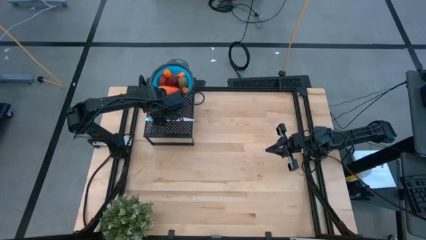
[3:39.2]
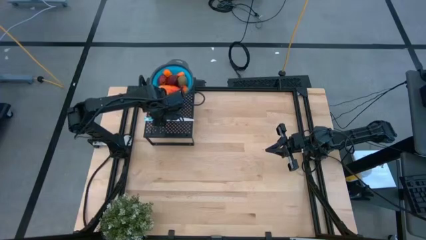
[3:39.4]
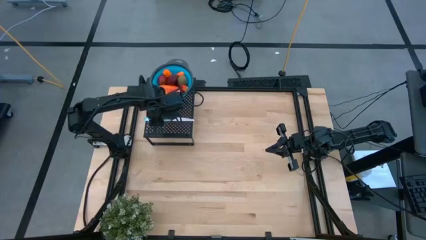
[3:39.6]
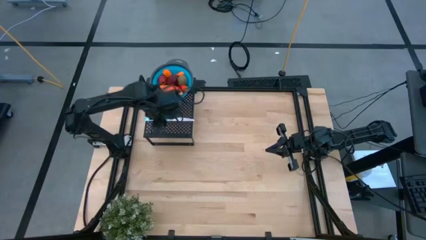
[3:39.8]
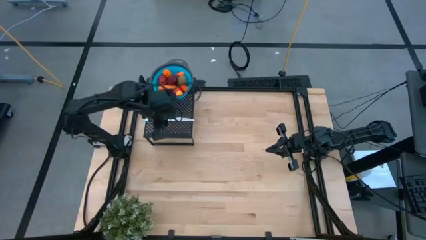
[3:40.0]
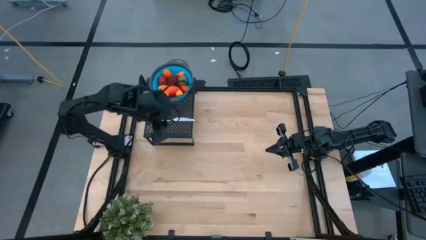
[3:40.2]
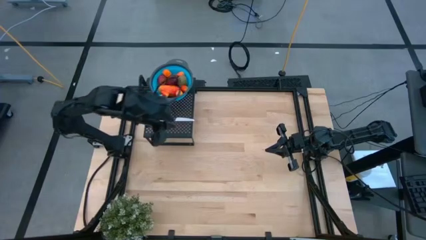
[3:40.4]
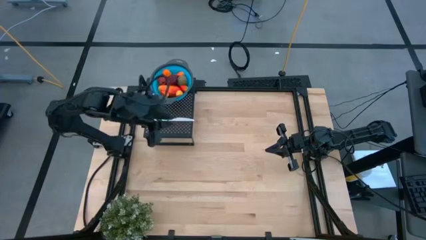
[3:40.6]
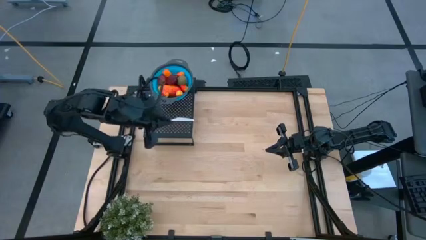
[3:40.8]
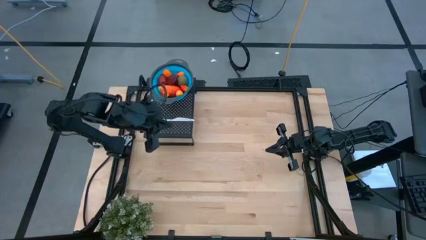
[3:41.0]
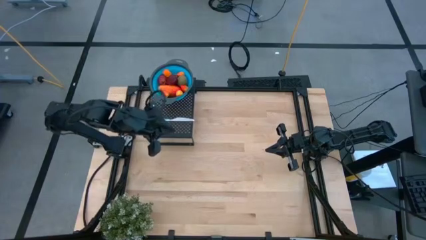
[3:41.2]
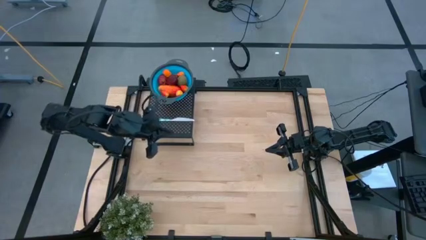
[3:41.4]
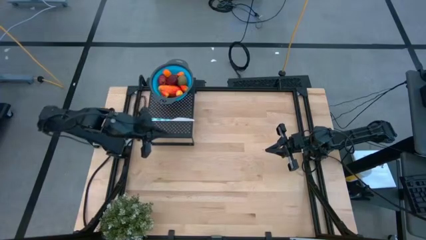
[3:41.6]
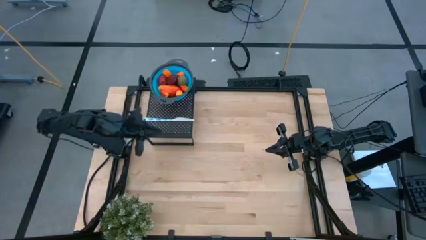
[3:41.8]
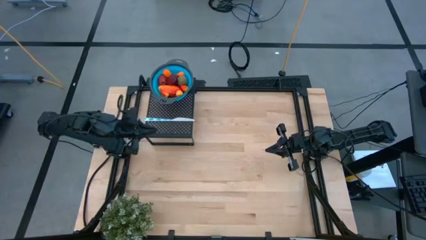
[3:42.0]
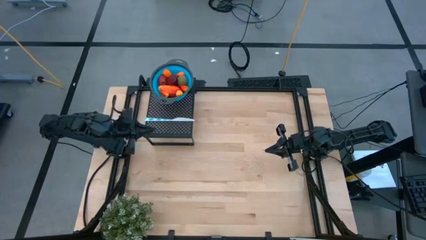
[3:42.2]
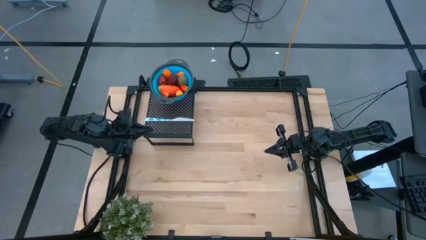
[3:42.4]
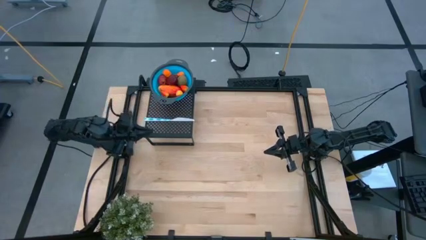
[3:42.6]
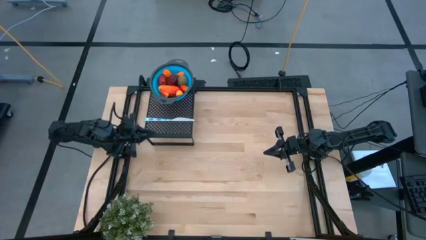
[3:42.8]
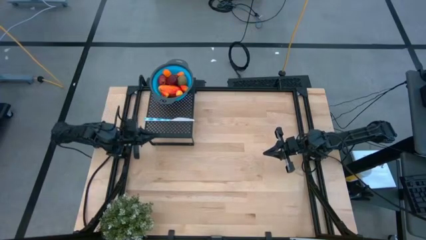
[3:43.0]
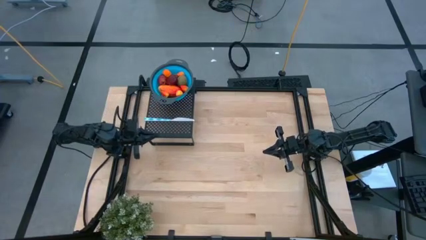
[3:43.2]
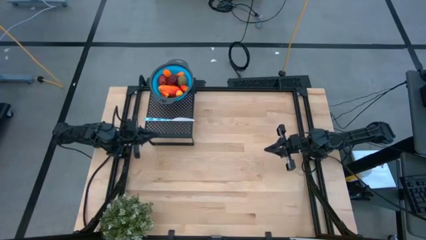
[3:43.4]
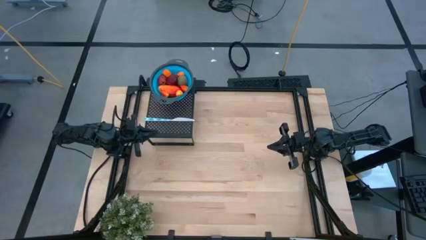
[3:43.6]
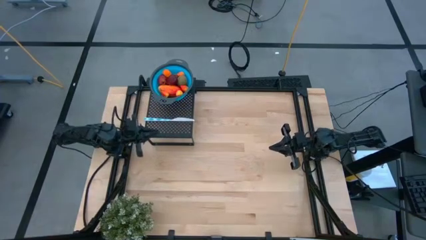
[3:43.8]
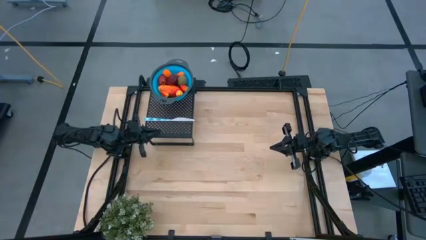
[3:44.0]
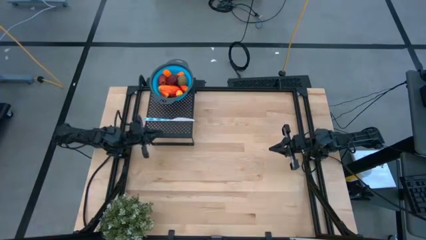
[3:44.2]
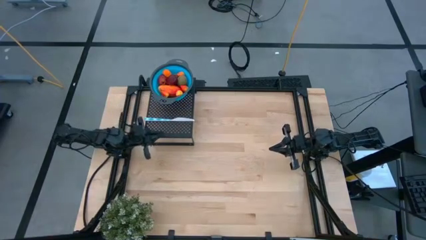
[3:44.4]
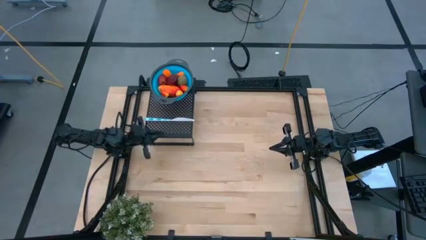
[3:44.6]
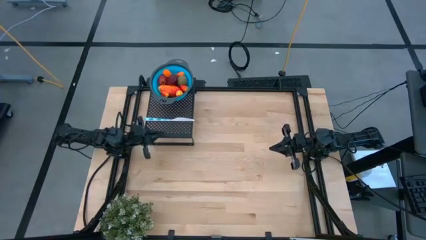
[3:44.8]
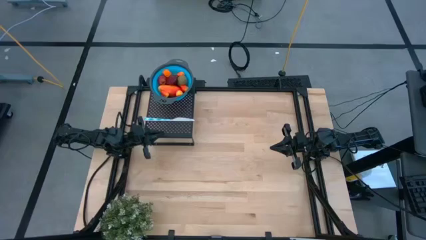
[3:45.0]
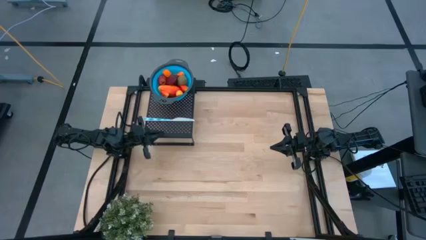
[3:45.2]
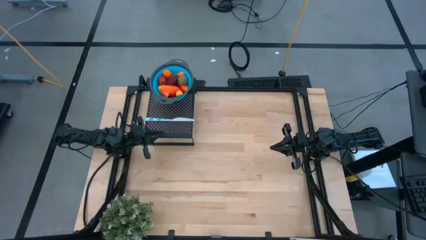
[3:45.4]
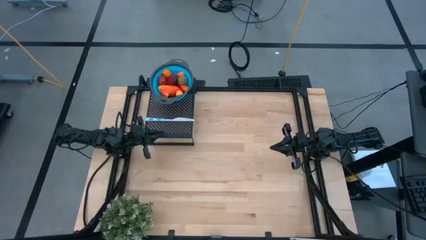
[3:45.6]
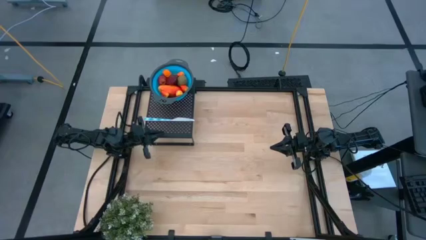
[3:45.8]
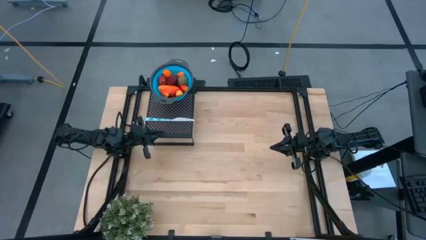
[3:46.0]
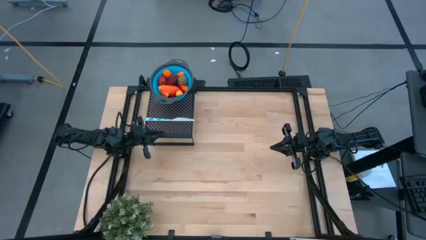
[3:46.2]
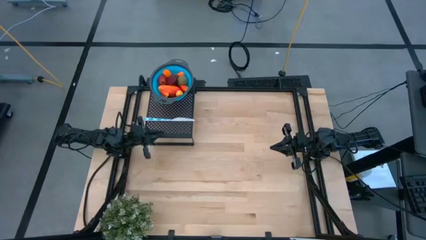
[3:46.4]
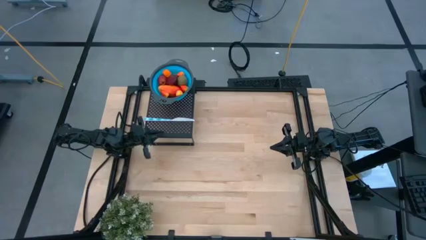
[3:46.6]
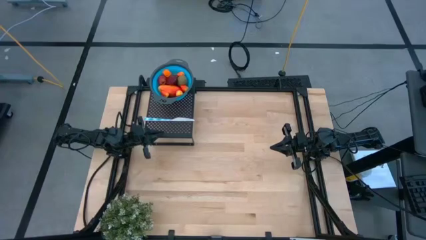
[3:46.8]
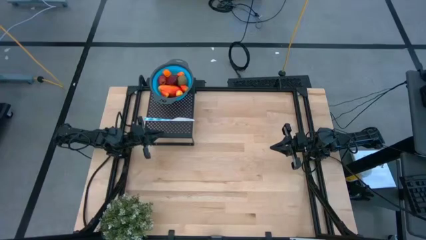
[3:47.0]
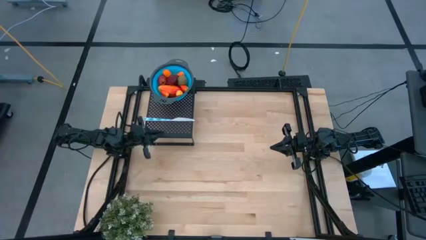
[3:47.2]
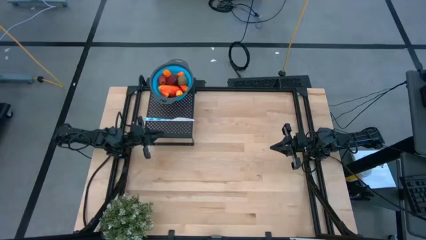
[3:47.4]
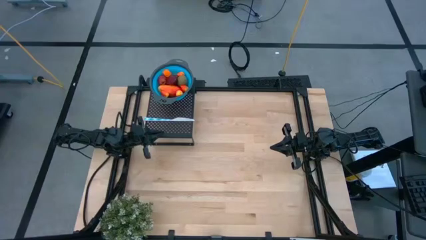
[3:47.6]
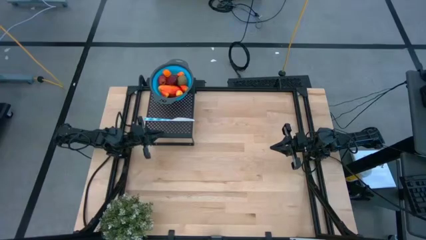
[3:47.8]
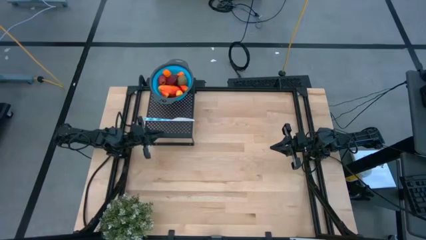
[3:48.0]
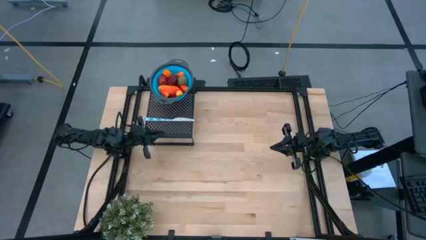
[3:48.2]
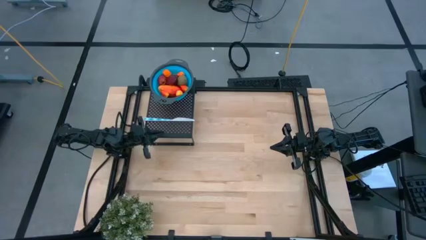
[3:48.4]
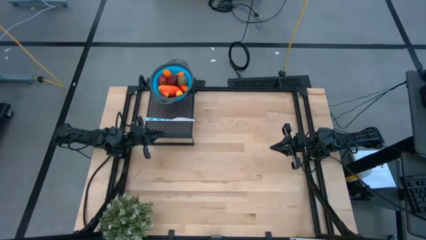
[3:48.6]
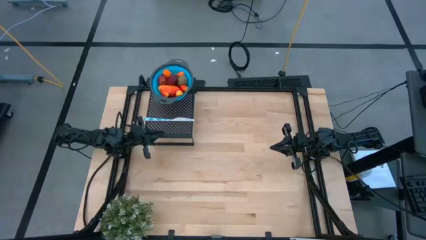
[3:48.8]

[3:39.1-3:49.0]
Task: Pick & Place Fruit
Return to Home Position

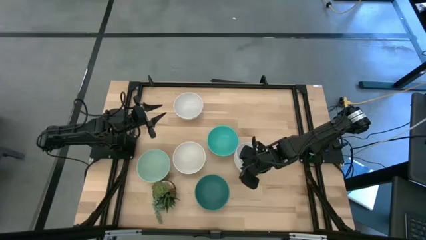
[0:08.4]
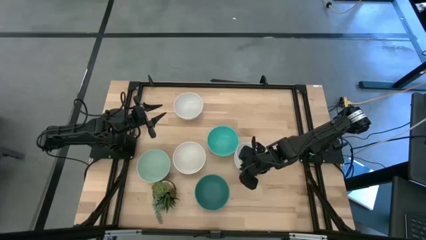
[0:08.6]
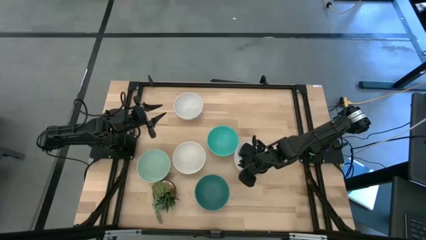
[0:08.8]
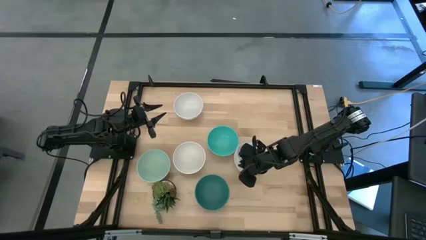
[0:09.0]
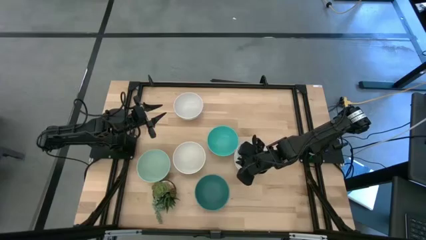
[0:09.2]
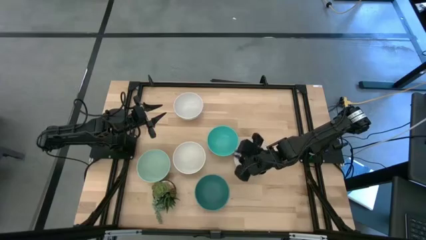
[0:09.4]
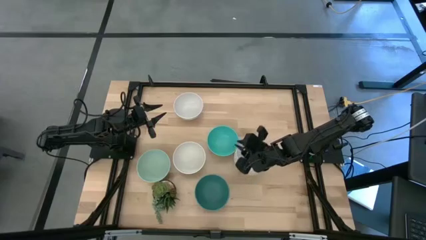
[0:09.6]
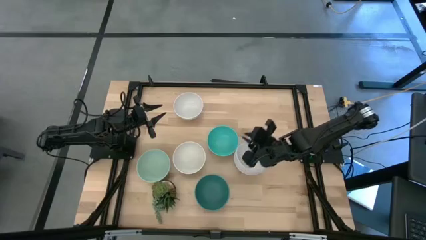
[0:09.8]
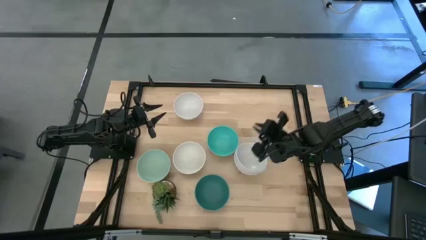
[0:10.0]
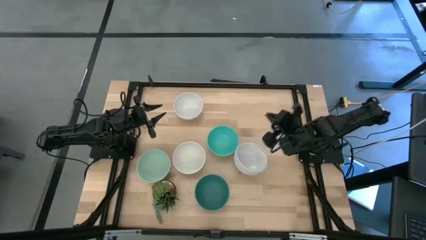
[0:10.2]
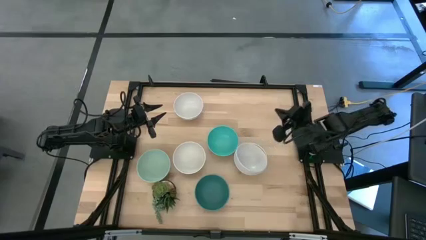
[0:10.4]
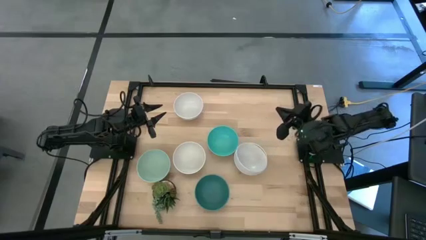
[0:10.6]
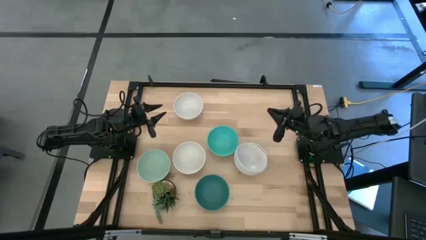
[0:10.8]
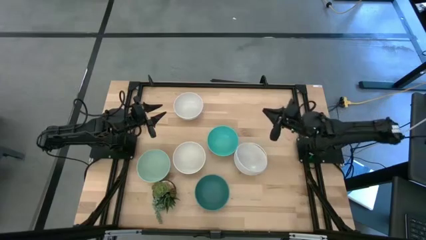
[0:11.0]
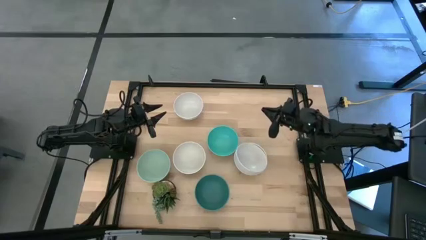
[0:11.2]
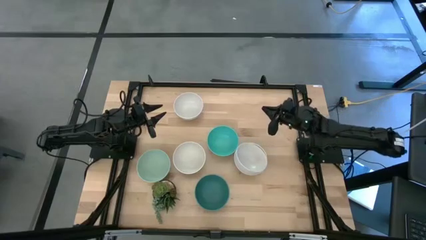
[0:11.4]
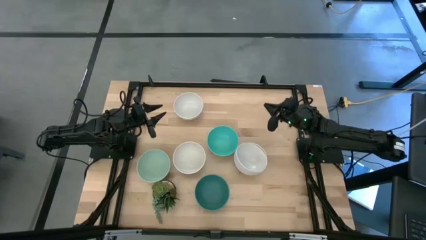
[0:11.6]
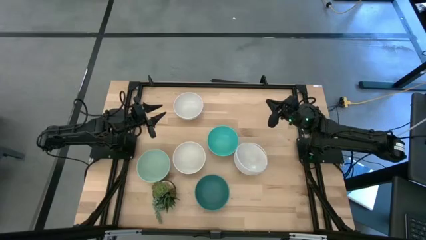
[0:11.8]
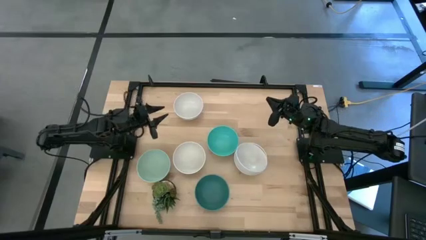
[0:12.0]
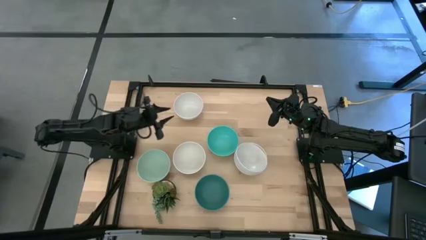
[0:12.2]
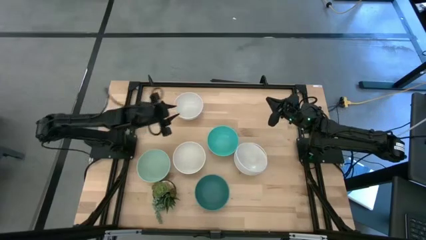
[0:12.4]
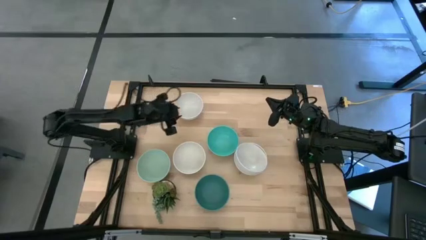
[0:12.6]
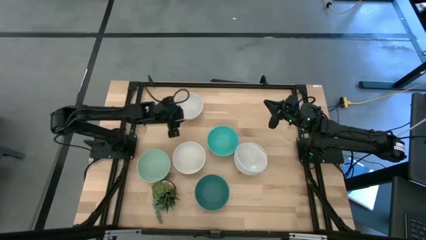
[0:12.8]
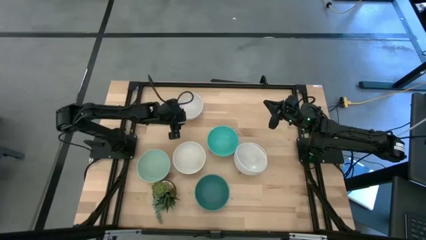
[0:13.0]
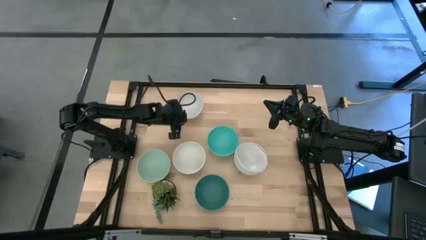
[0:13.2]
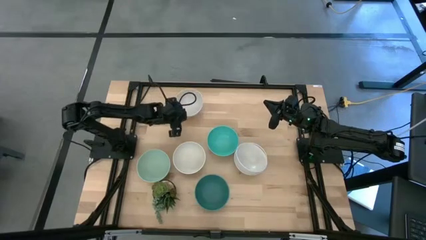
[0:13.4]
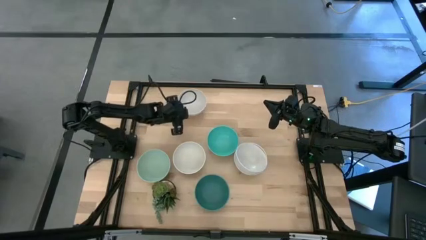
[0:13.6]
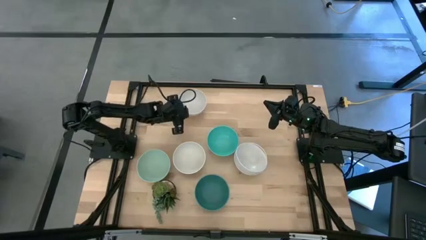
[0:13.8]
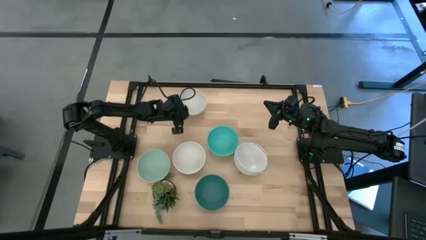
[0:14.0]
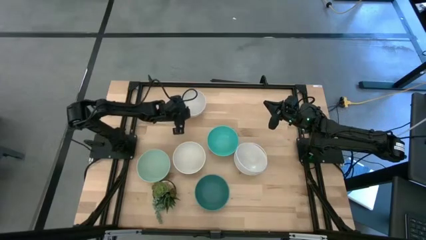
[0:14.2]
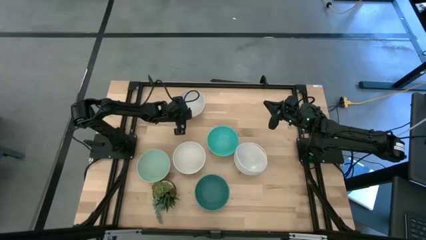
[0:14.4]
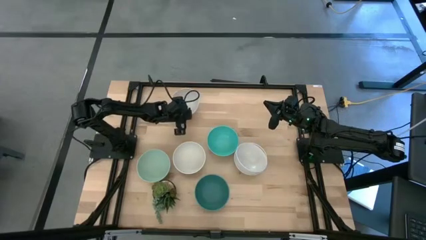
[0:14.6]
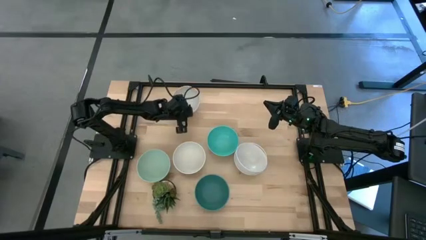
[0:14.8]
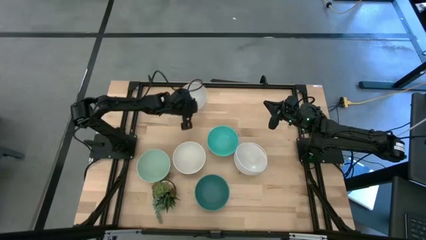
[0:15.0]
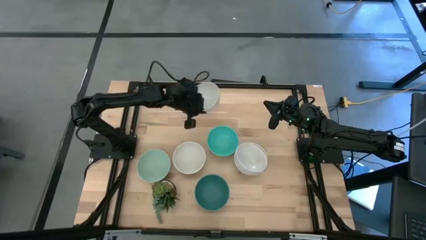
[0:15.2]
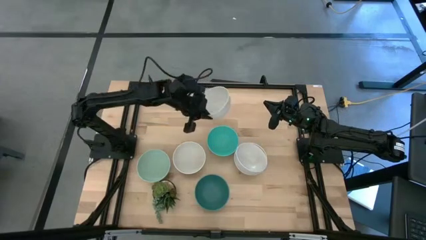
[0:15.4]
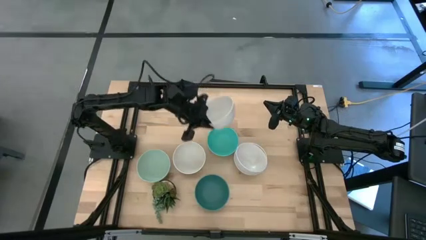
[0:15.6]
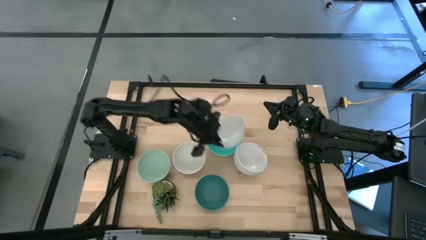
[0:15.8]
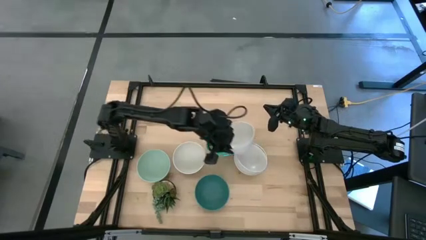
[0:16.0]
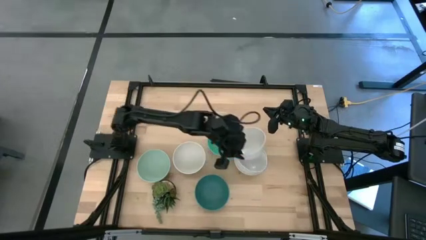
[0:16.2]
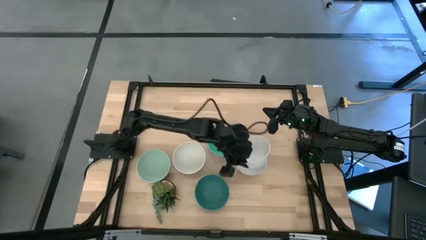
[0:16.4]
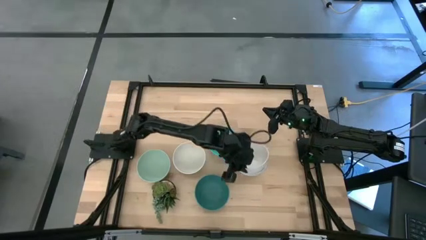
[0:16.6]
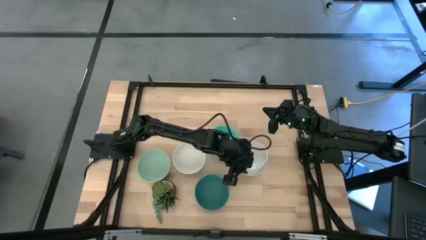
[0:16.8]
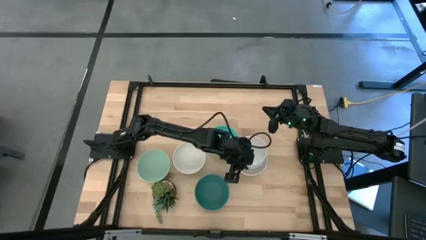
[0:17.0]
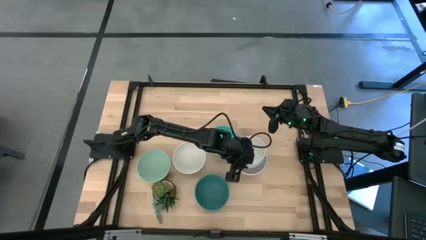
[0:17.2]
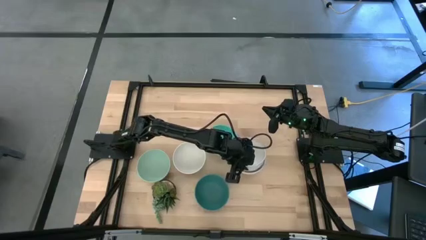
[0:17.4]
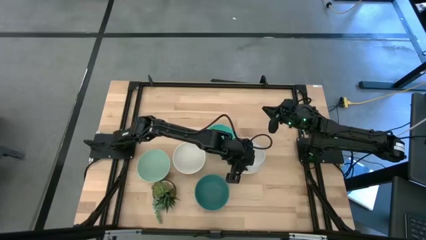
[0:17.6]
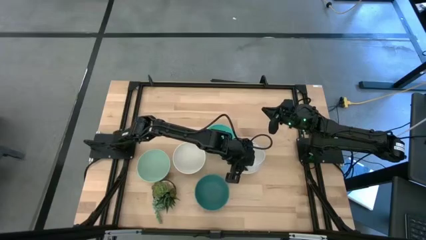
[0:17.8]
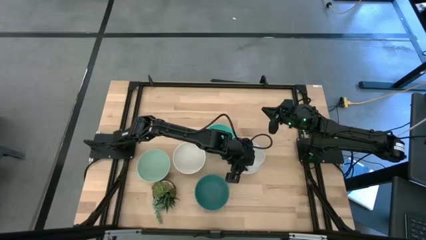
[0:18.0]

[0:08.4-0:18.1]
Task: Nest bowls inside each other
Stack the top white bowl on the bottom right white bowls
